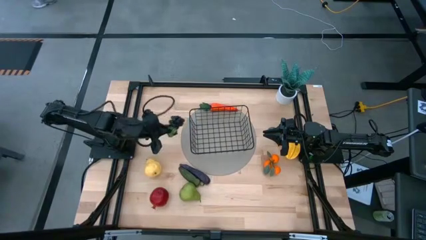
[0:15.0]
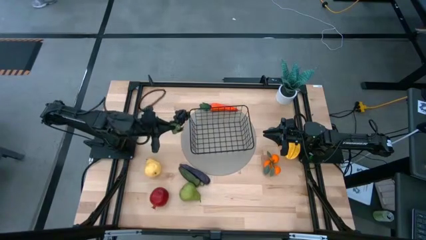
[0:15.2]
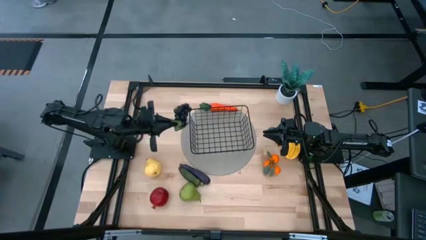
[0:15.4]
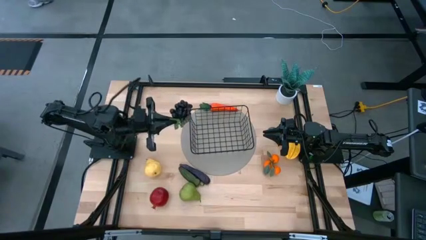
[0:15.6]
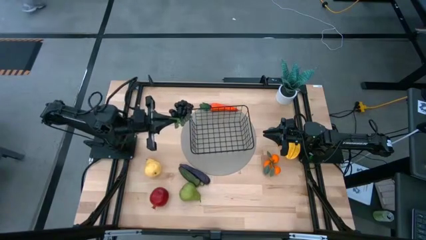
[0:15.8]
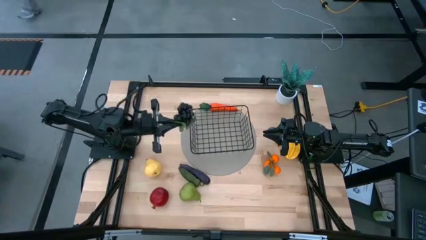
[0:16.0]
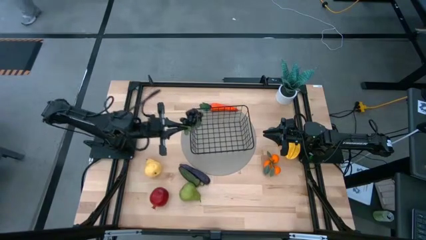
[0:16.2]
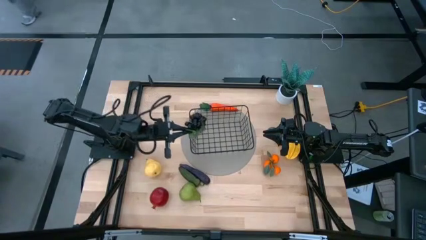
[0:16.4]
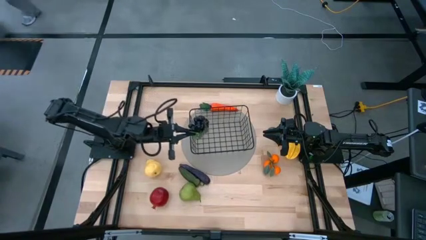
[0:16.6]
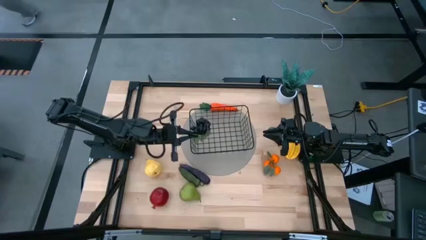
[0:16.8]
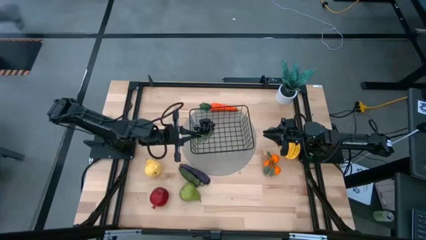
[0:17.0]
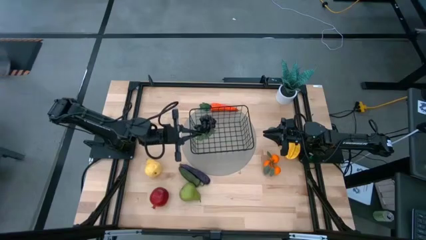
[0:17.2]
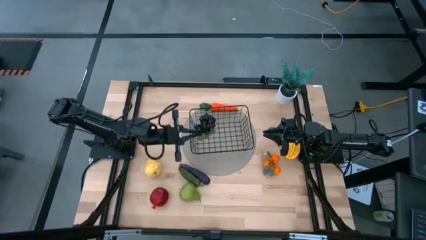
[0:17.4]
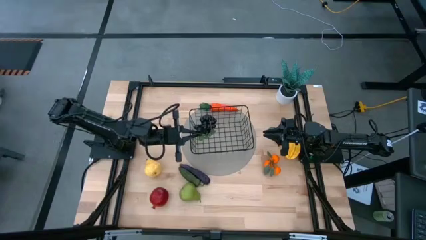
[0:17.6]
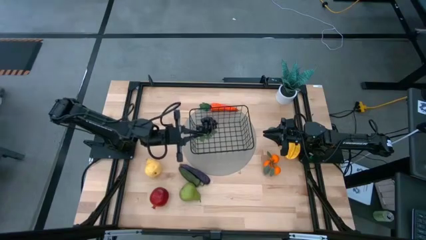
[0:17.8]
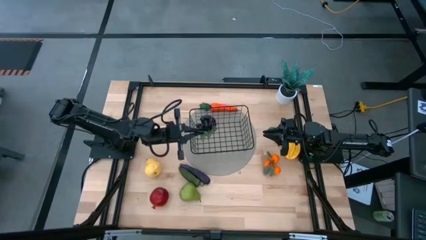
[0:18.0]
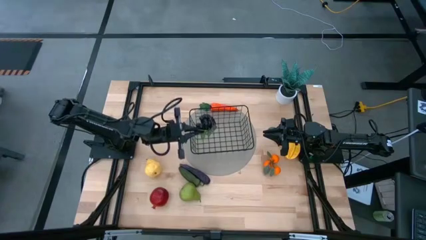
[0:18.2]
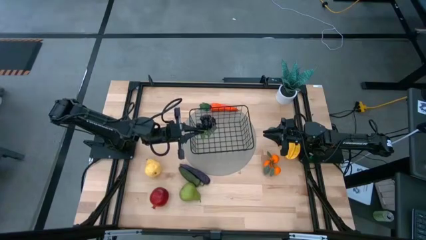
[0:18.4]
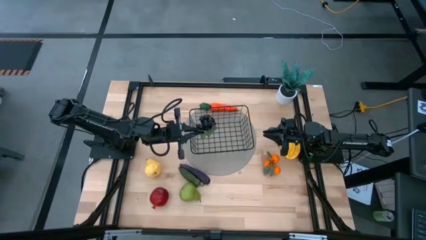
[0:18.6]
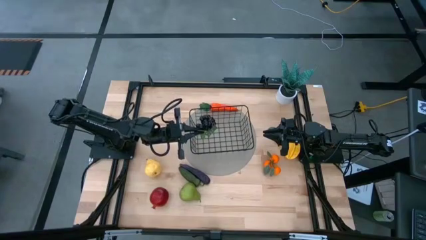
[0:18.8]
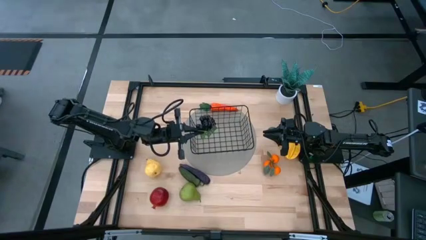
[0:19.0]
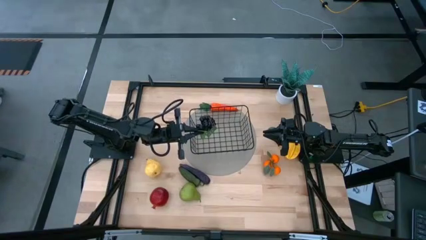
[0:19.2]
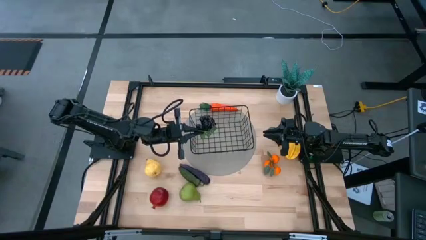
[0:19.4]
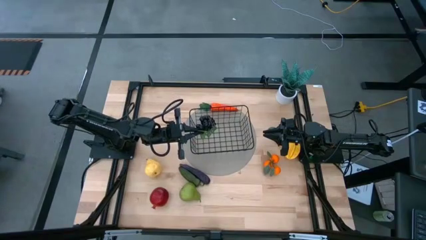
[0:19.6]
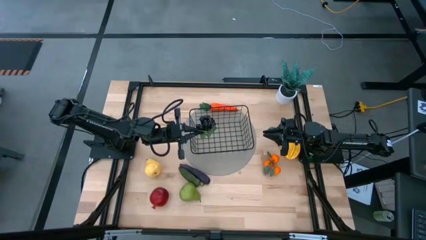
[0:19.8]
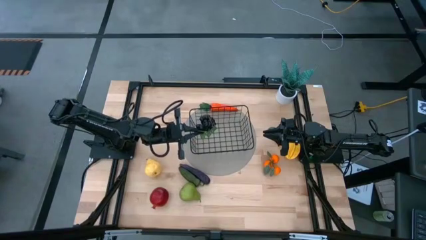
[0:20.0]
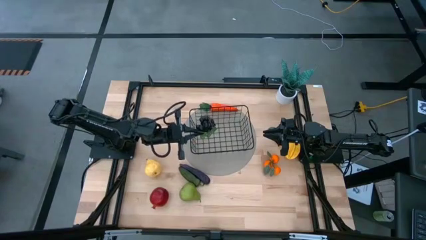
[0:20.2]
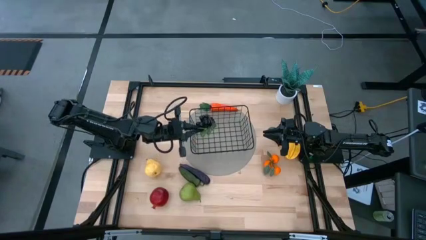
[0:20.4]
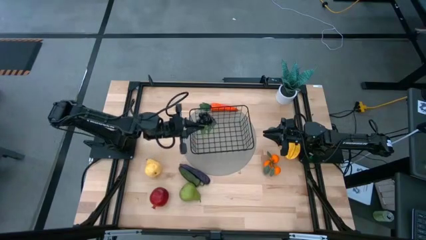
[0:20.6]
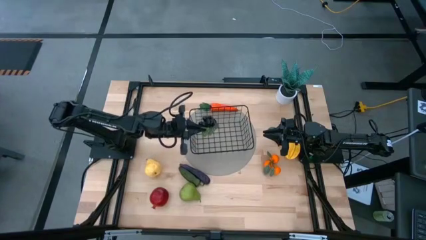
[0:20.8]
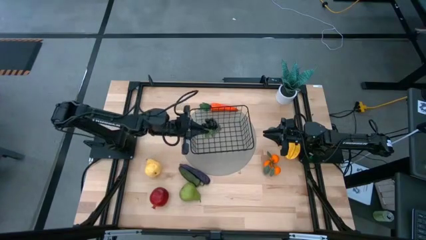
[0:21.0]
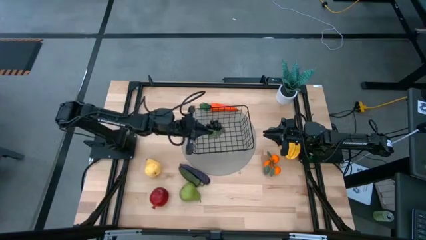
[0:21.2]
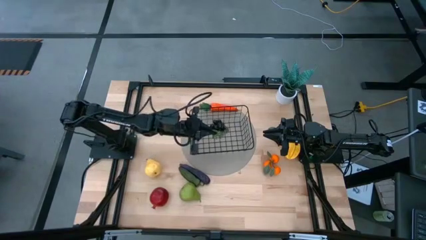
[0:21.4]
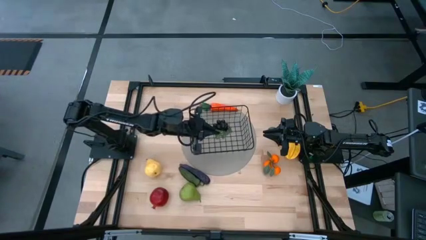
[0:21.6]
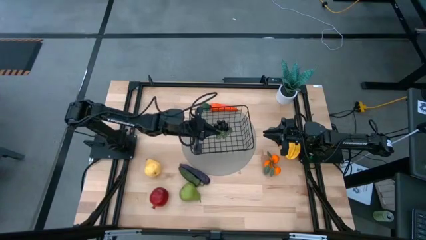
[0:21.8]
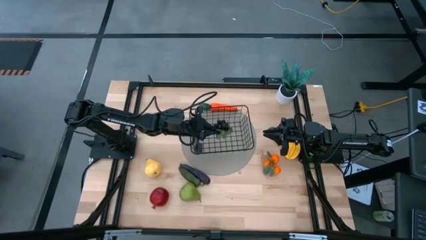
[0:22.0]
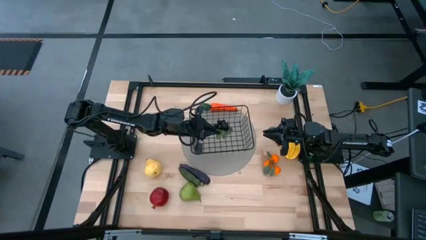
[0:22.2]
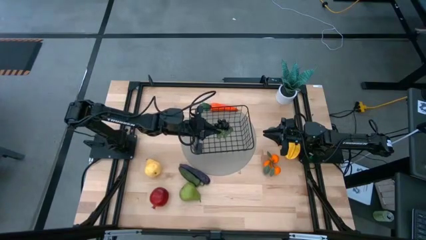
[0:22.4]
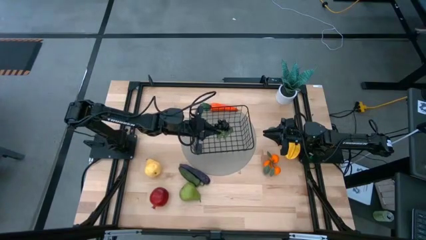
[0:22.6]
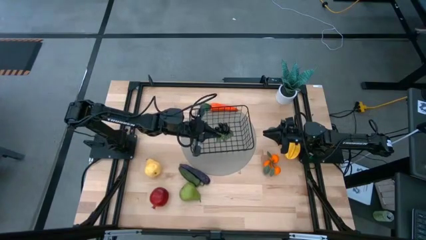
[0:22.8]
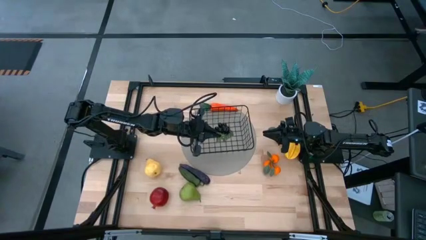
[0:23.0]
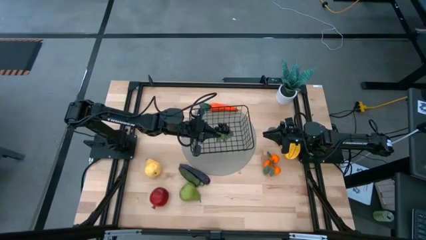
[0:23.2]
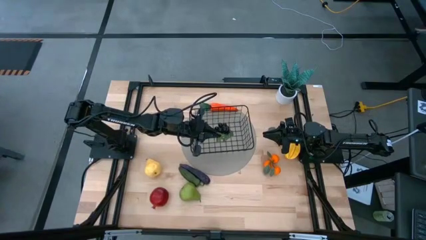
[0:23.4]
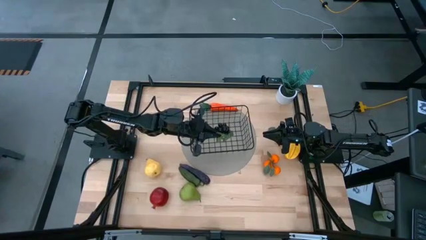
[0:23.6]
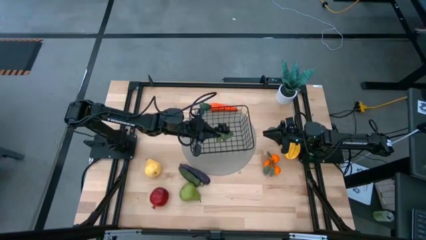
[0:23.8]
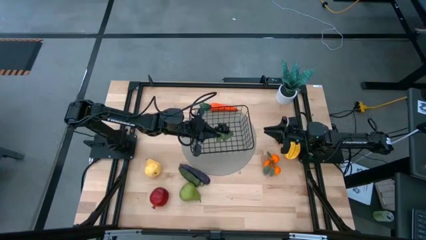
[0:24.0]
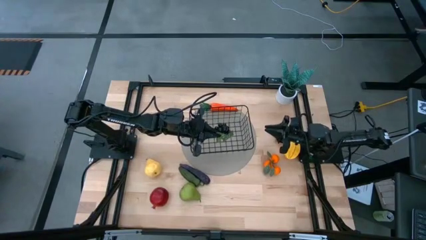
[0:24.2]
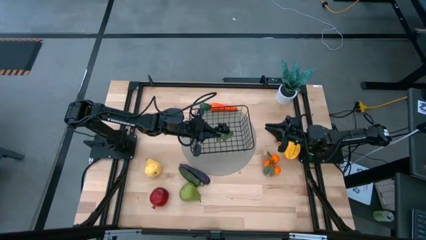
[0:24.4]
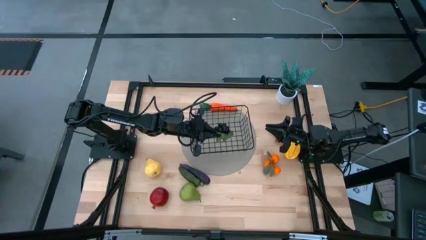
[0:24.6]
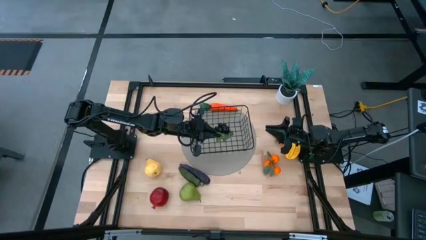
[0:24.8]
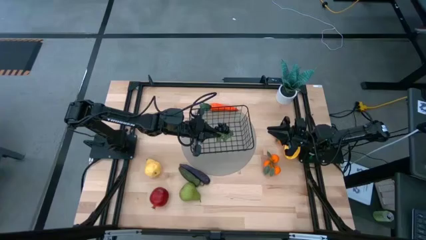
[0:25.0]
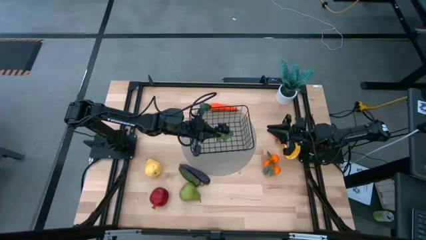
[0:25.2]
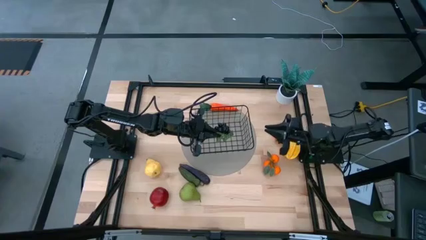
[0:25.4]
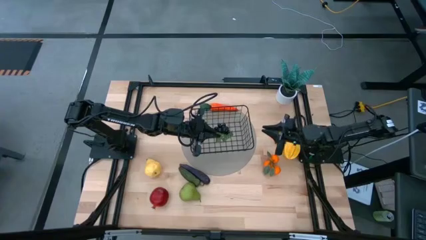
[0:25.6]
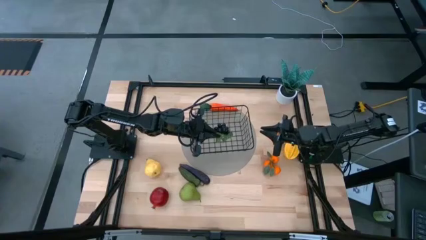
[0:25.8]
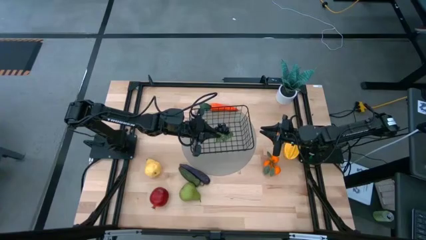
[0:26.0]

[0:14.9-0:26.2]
Task: Build produce basket
Put the grapes in the mesh basket

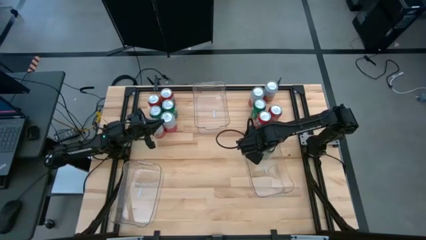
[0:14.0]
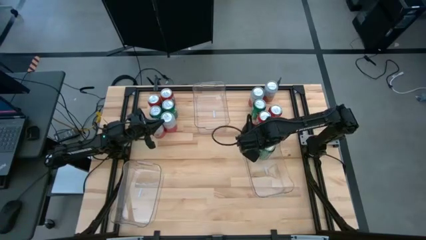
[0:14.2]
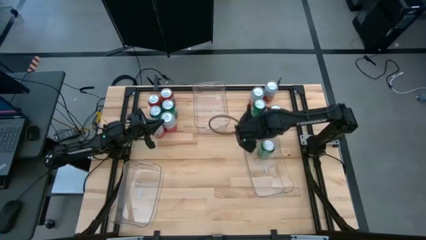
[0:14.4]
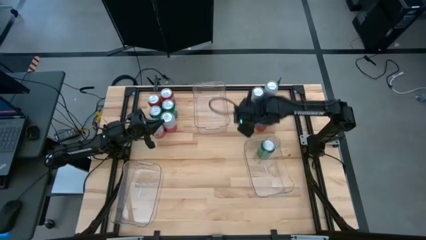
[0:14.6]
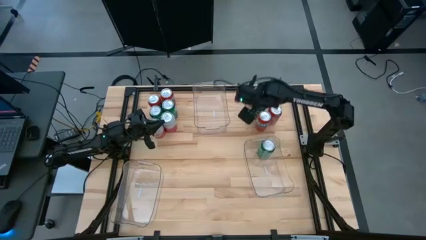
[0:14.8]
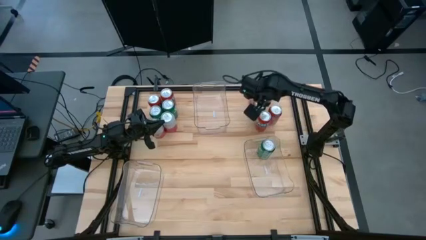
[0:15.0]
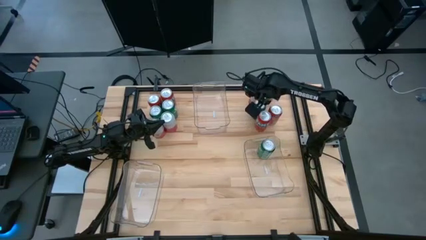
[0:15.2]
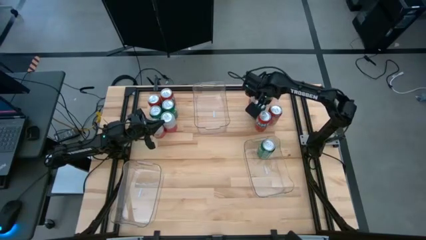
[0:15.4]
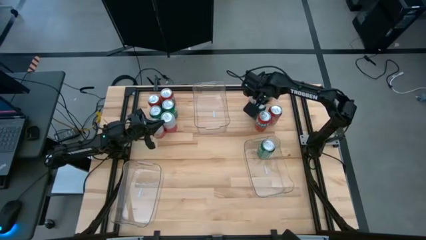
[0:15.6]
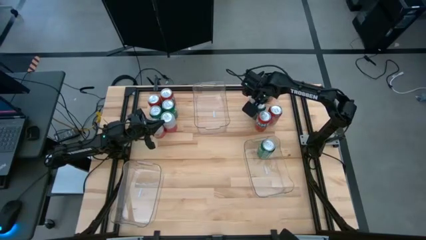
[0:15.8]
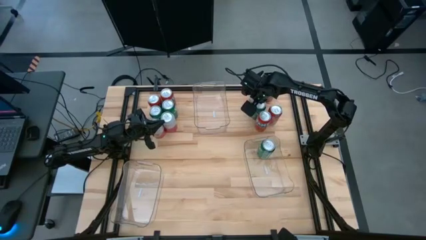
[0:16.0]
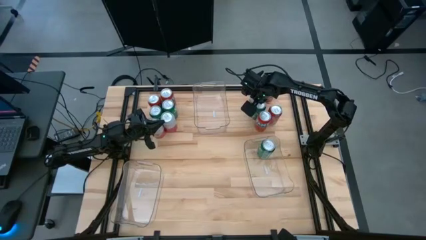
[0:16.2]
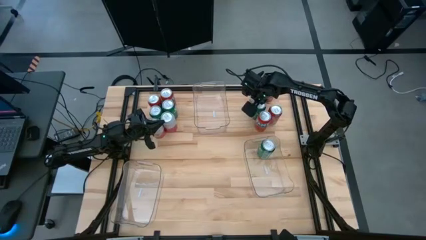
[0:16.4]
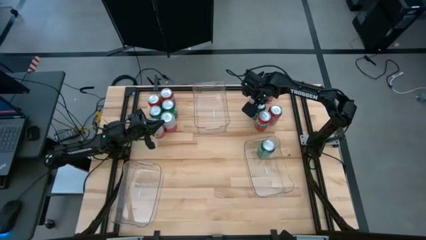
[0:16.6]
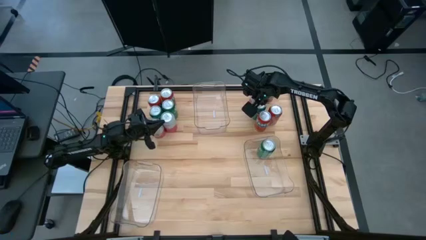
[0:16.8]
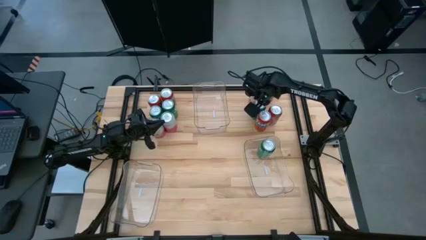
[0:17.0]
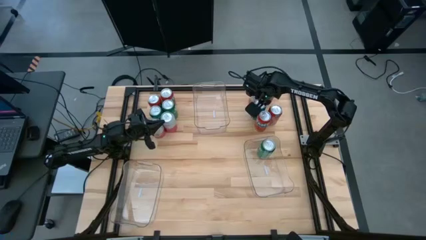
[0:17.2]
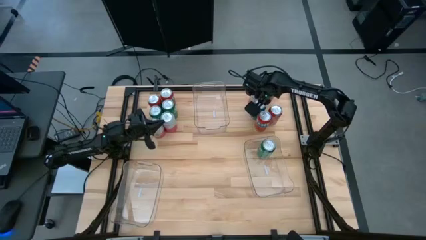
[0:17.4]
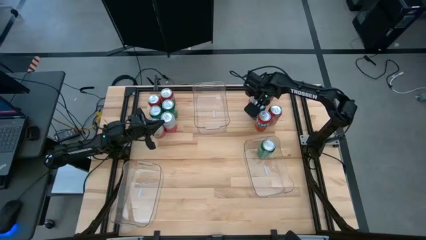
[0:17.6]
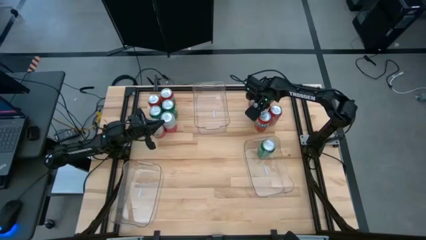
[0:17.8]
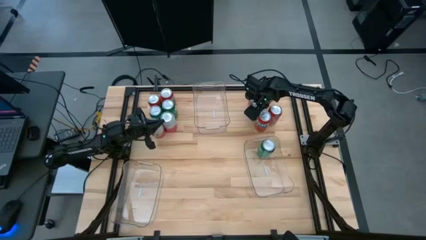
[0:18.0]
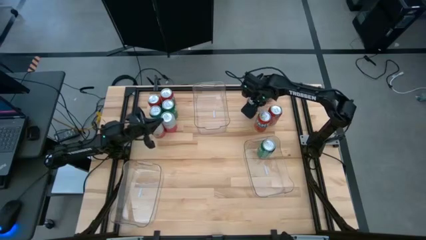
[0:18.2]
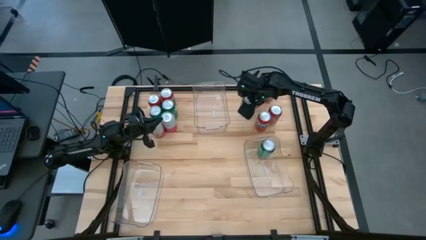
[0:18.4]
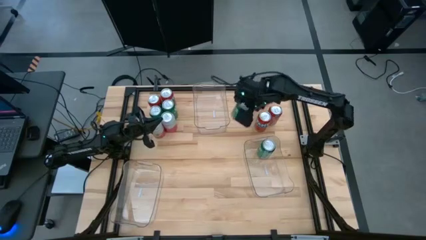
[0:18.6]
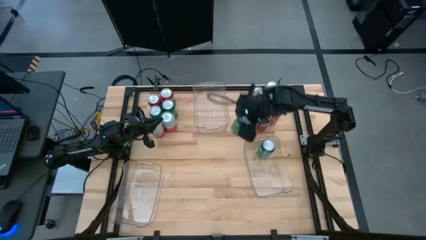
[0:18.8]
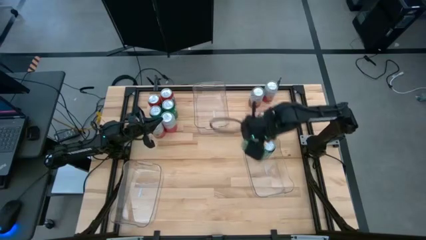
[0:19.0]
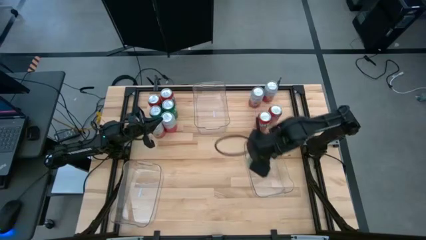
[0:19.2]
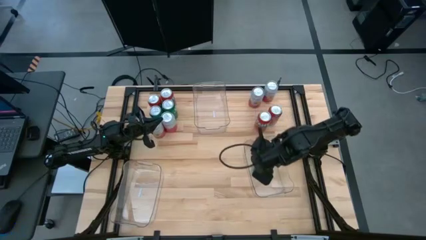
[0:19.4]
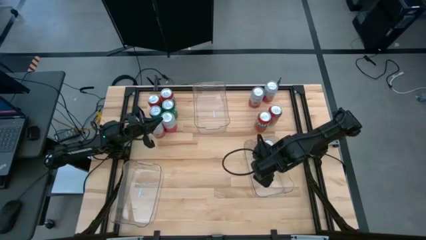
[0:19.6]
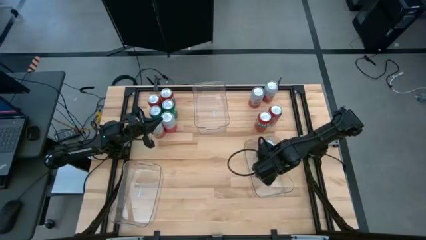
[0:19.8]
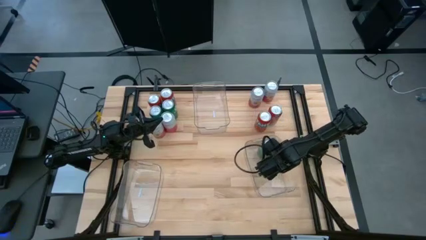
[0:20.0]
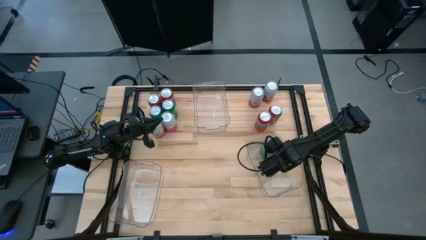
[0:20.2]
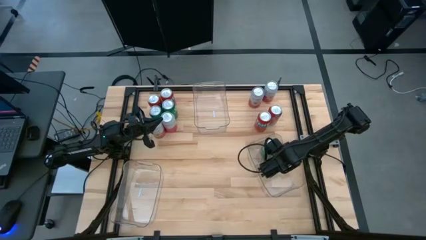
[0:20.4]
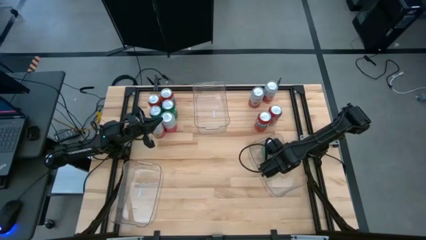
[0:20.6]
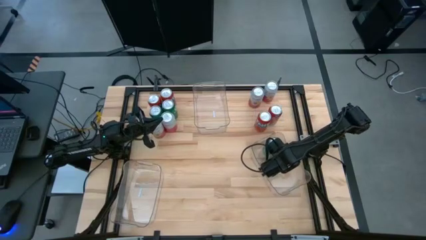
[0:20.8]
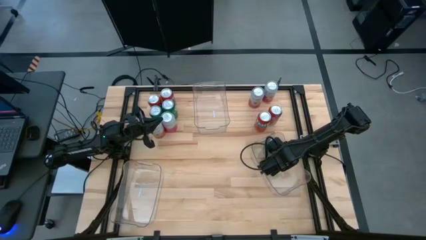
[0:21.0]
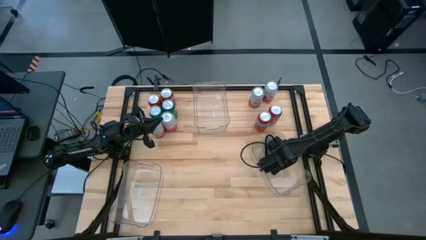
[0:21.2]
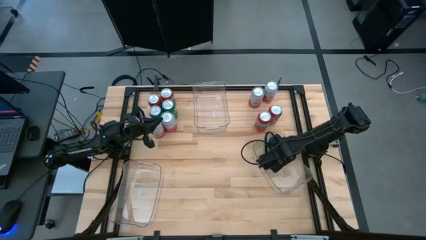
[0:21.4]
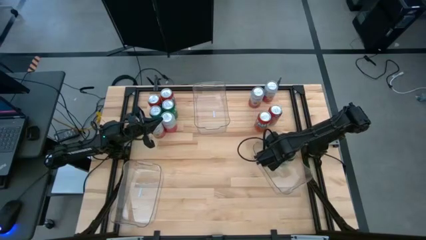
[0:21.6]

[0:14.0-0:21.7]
Task: Sort soda cans
Put the green soda can into the bottom right transparent bin
